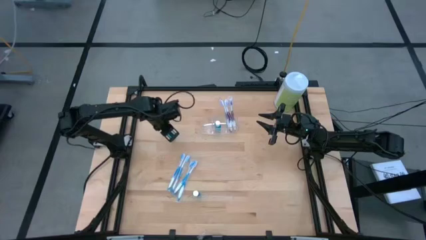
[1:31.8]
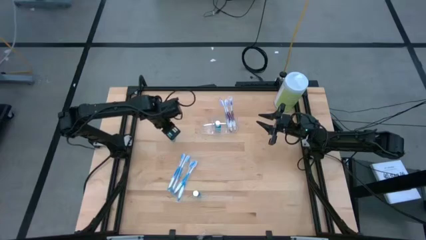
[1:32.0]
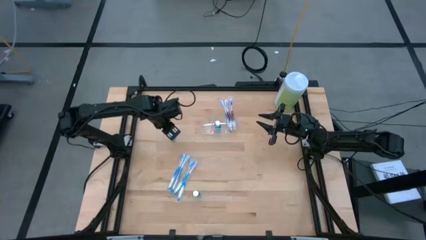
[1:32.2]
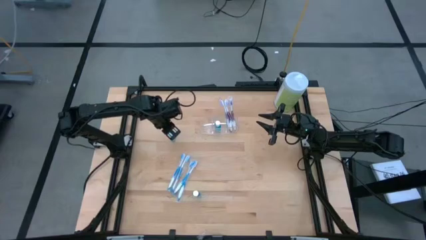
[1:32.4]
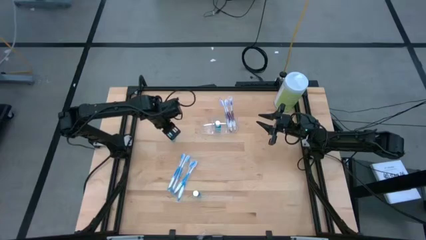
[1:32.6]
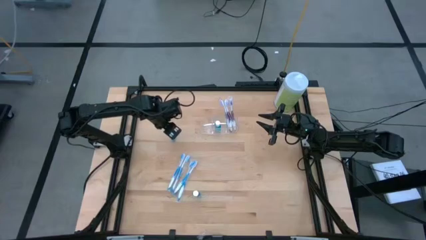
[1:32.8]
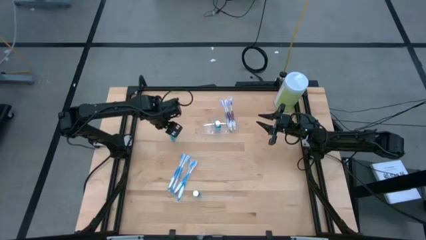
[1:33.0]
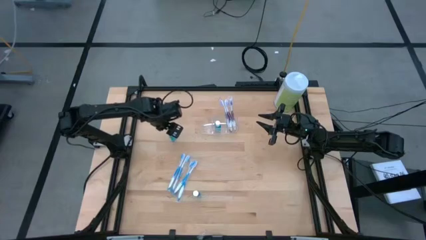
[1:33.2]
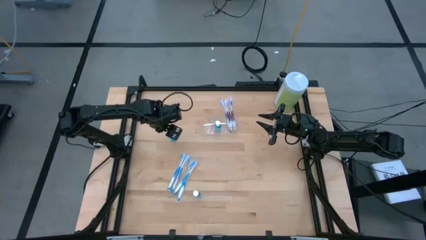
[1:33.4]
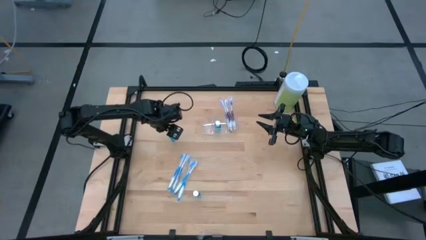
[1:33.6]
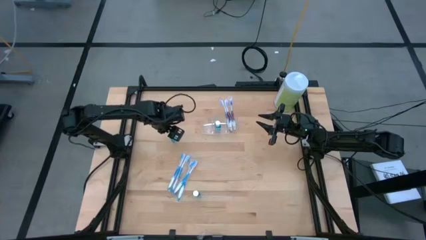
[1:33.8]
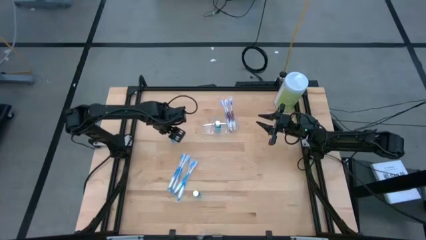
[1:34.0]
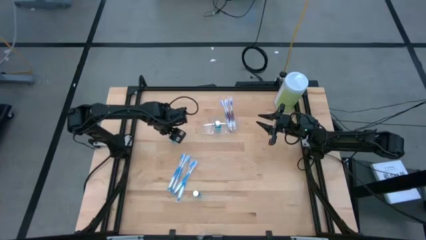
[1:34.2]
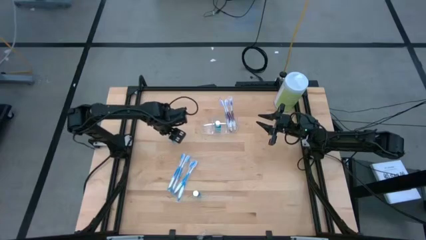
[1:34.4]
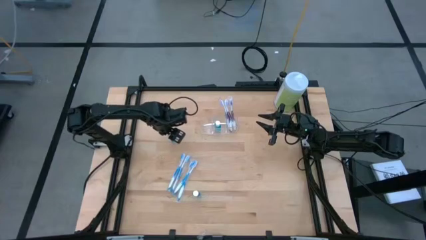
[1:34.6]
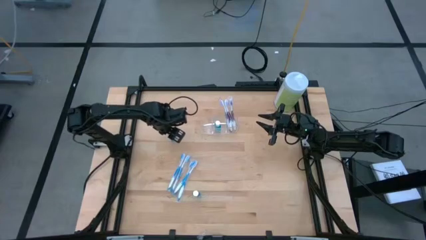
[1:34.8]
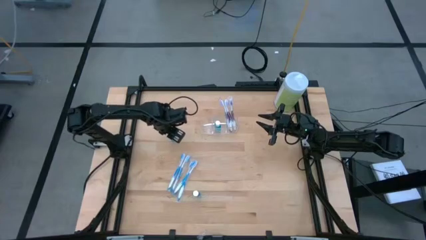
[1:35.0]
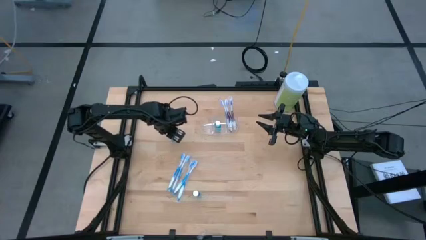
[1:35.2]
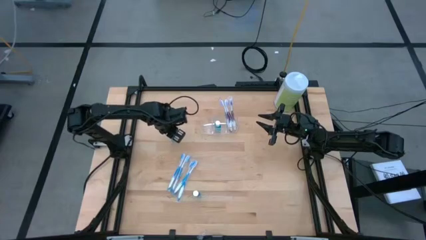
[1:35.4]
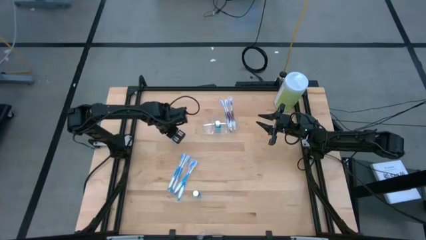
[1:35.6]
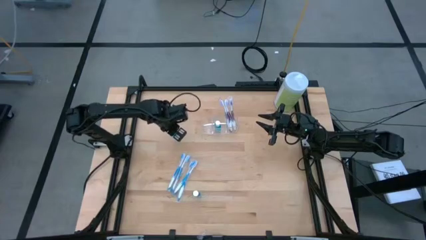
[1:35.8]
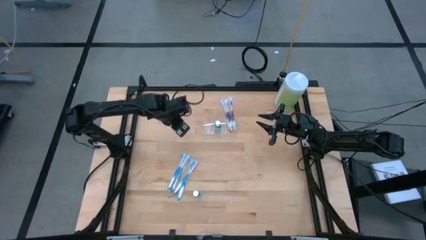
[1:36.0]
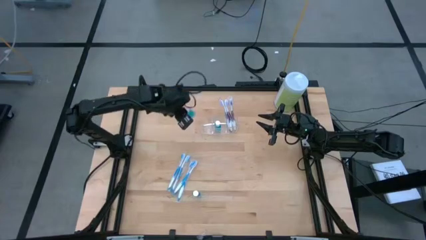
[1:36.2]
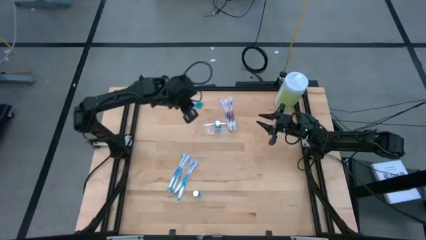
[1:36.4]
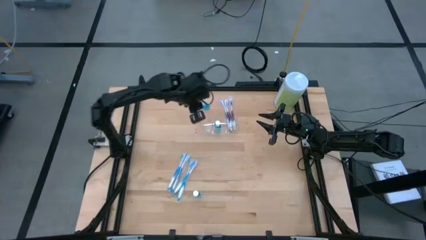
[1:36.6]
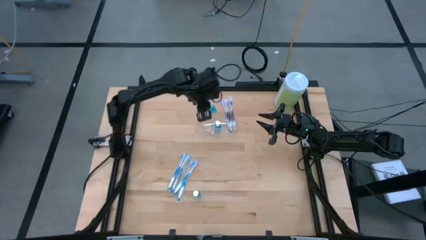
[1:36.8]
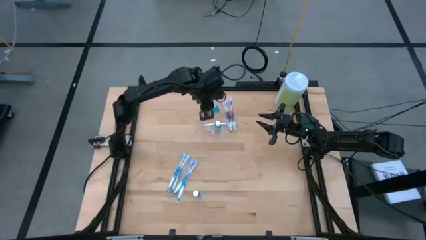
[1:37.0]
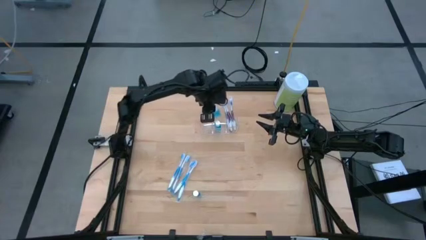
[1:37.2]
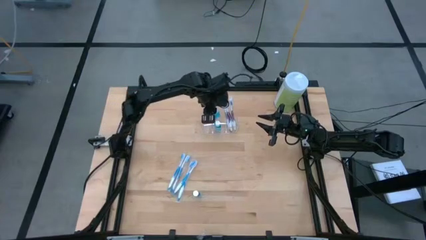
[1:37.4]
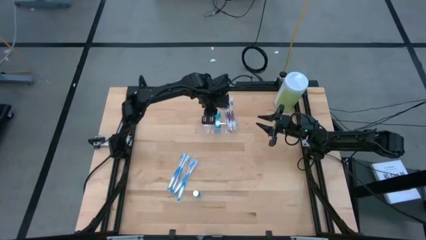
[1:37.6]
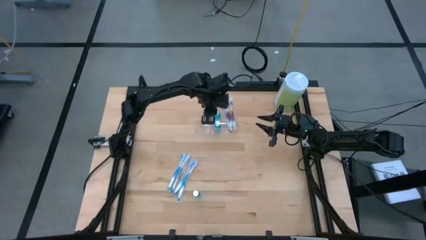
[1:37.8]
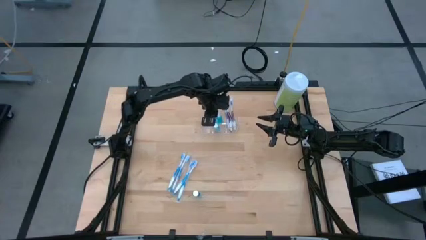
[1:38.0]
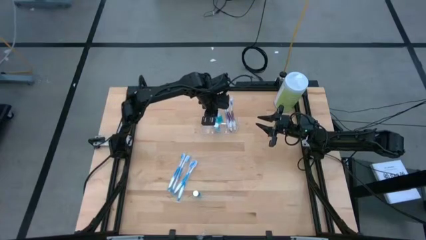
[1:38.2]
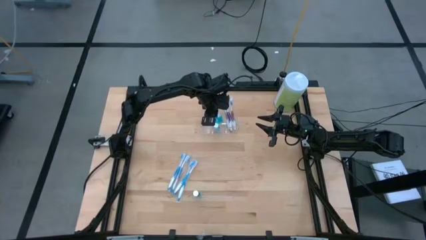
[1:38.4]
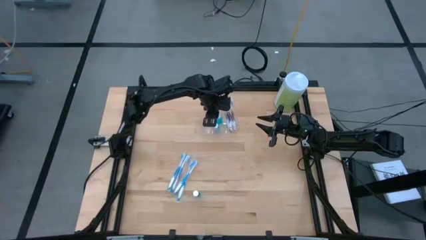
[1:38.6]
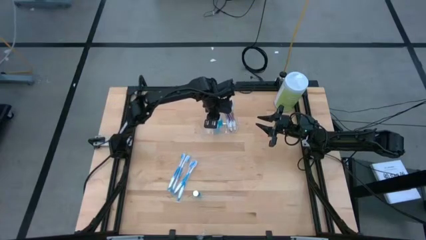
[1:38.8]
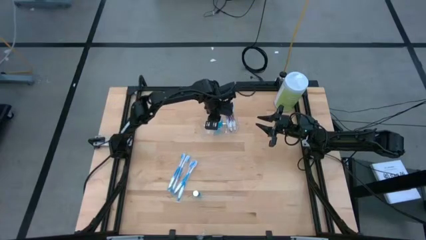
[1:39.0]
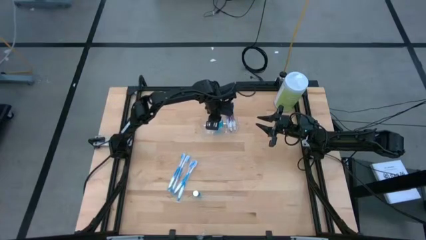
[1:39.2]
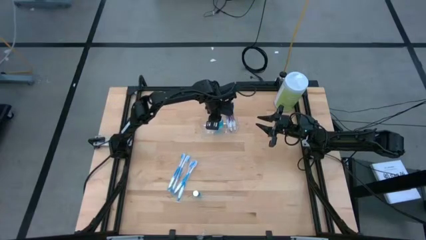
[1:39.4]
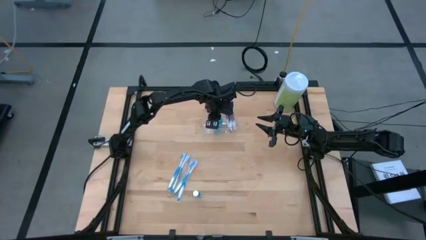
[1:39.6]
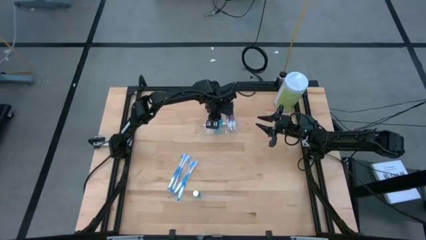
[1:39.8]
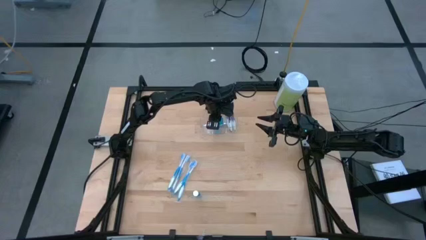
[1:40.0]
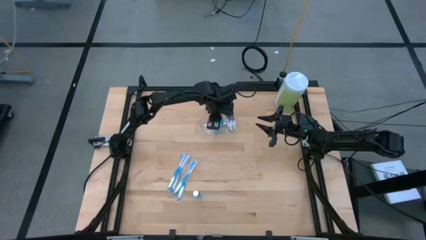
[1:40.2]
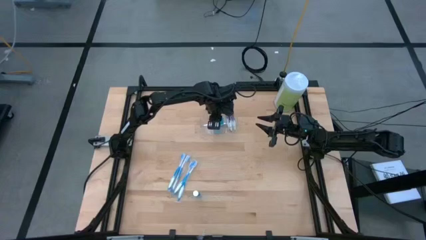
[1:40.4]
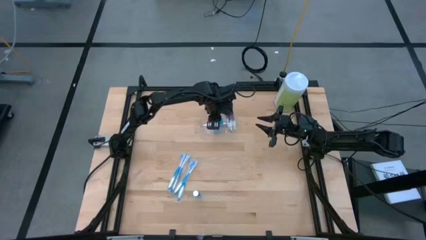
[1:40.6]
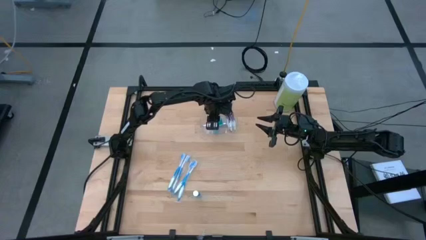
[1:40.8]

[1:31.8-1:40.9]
Task: Pick & Place toothbrushing station
Put the top blue mouthwash into the transparent organizer

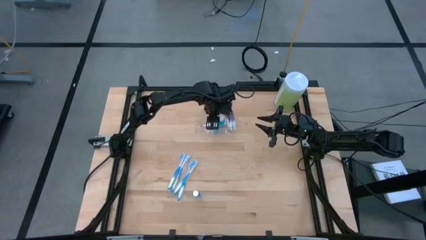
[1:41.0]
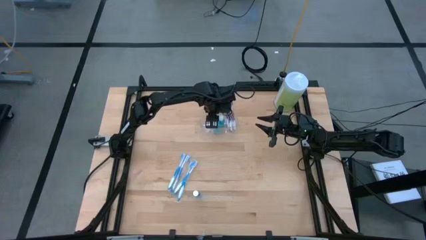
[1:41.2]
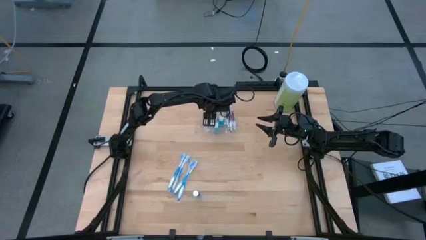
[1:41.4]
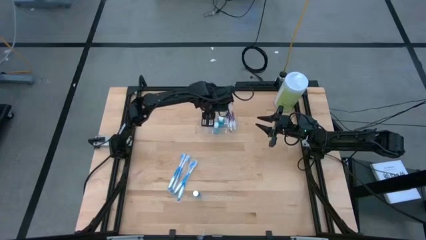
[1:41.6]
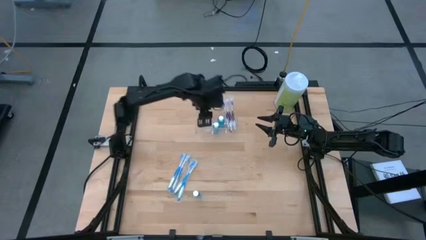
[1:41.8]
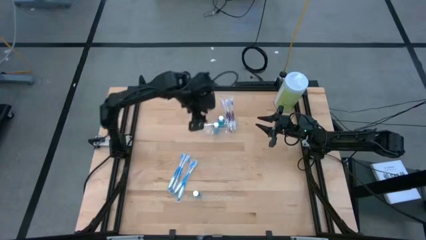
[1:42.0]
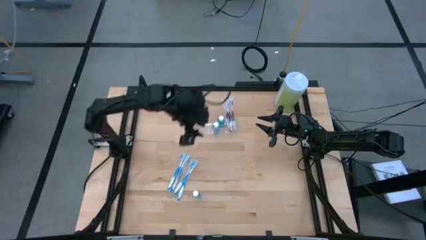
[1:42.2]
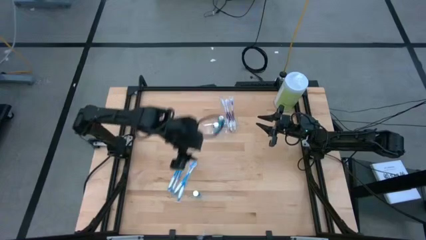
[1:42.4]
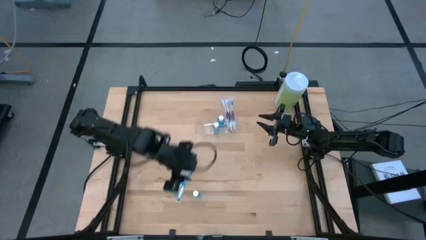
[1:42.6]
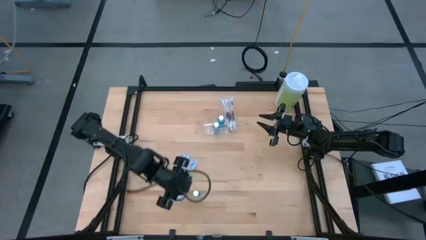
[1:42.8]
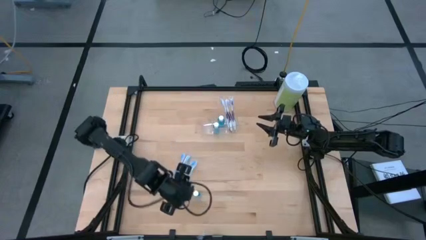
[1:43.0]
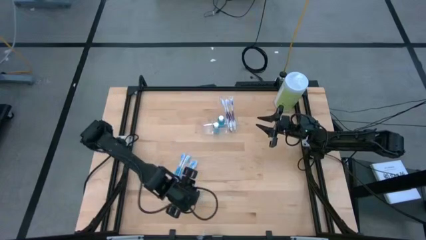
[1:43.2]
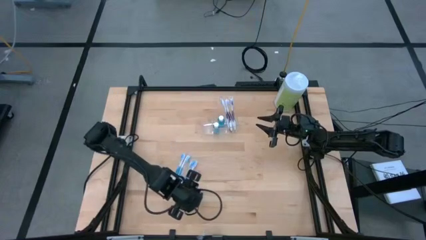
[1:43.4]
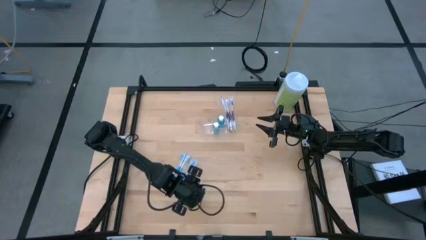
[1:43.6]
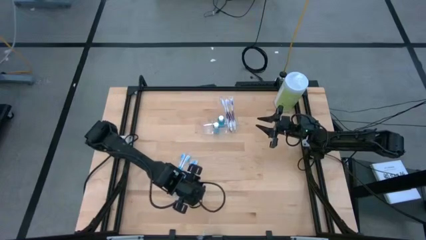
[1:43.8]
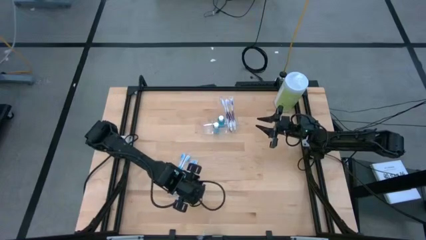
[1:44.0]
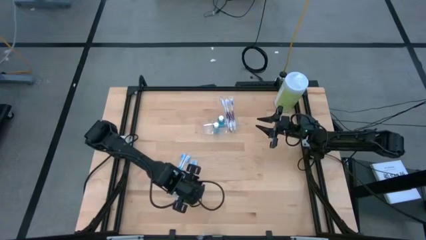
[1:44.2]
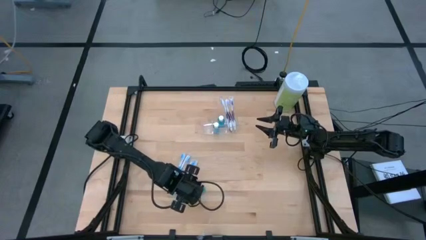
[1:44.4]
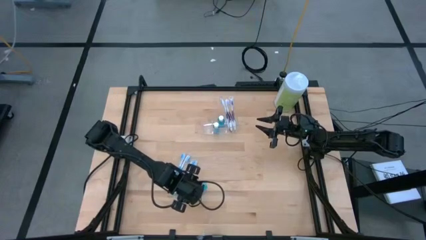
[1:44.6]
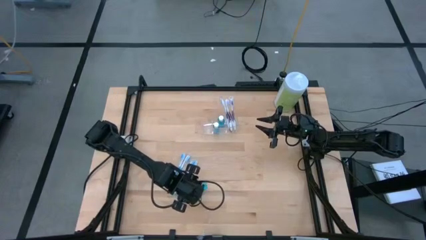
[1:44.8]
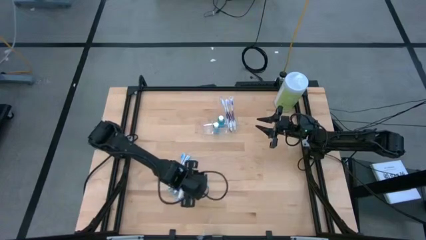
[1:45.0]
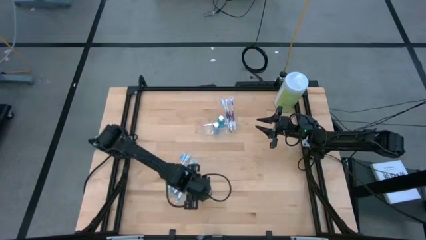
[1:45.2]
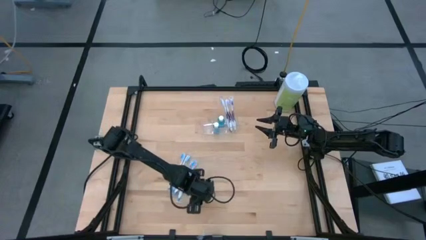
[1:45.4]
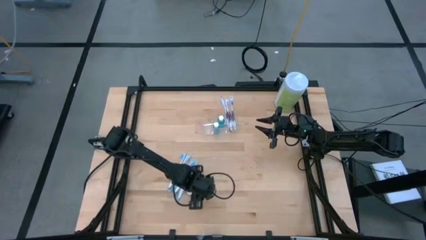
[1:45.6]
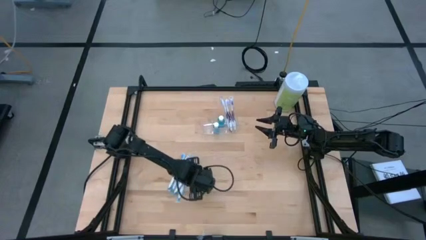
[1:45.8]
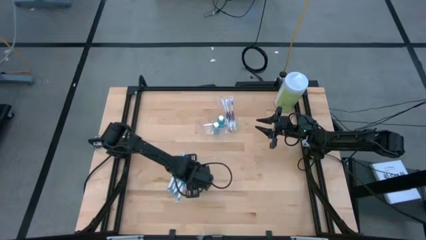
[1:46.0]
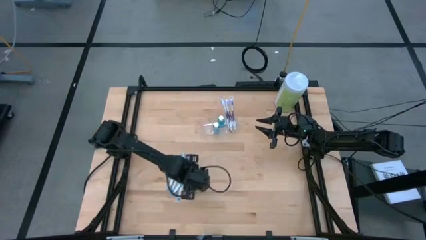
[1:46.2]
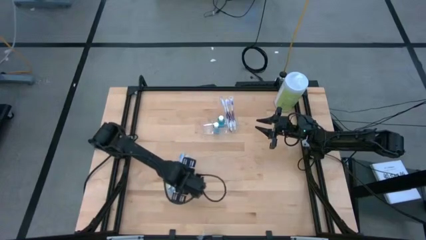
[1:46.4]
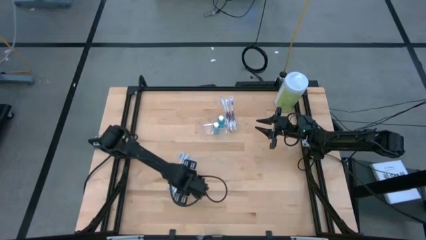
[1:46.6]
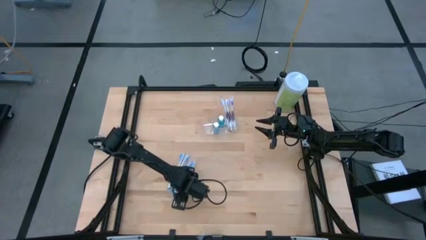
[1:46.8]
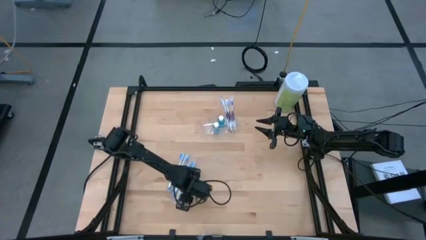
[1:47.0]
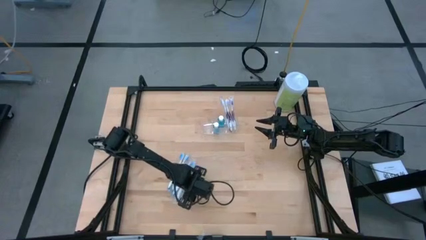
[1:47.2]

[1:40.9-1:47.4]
Put the blue mouthwash into the transparent organizer
